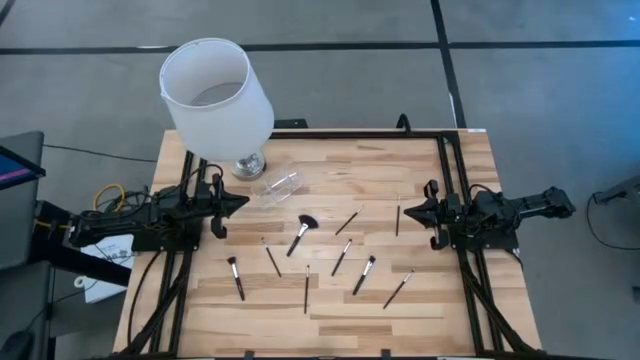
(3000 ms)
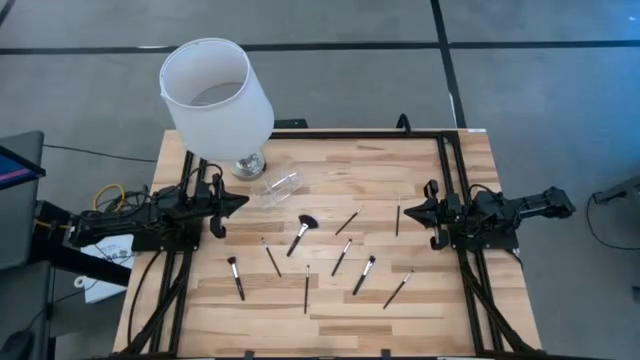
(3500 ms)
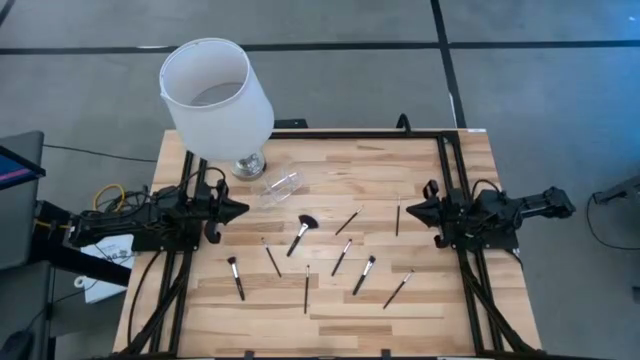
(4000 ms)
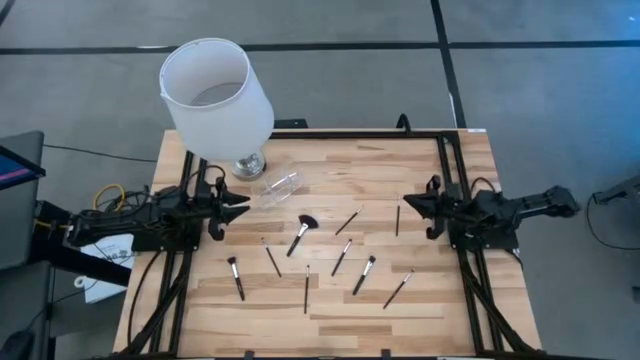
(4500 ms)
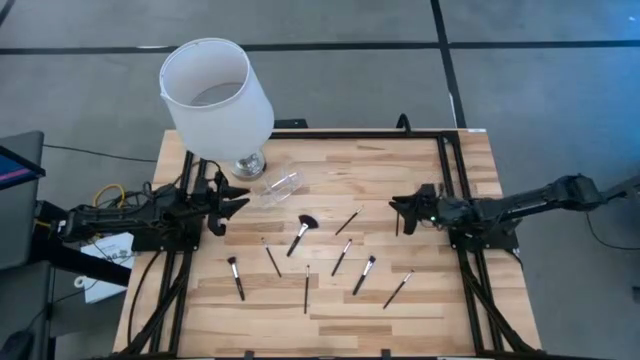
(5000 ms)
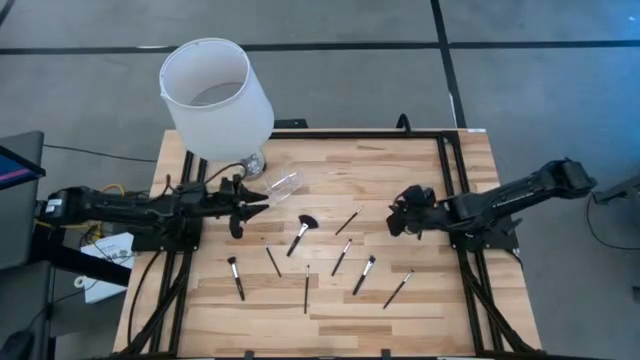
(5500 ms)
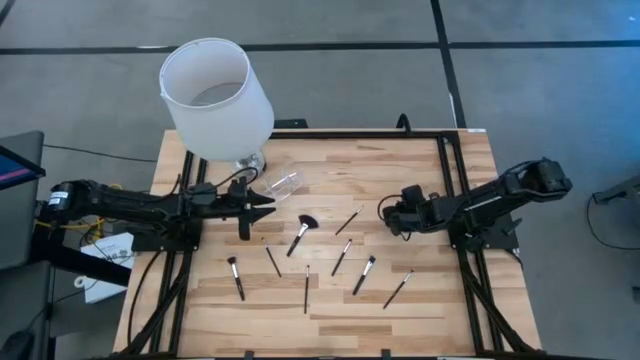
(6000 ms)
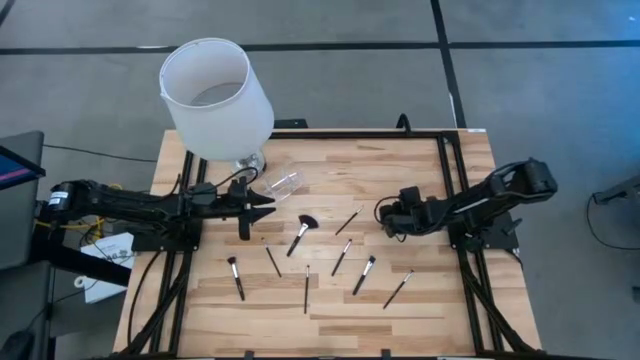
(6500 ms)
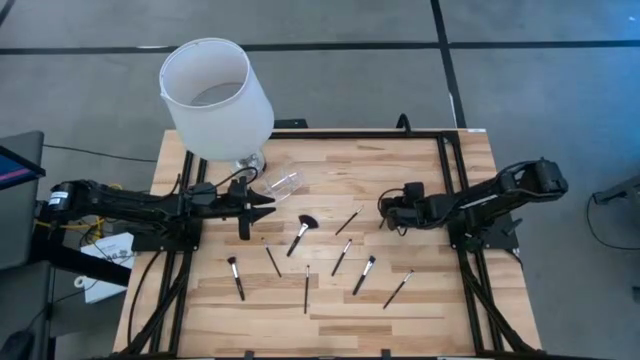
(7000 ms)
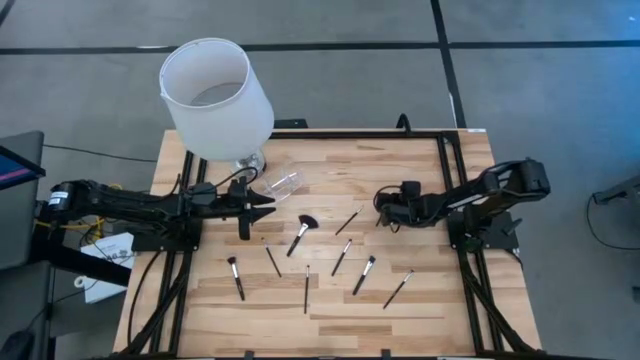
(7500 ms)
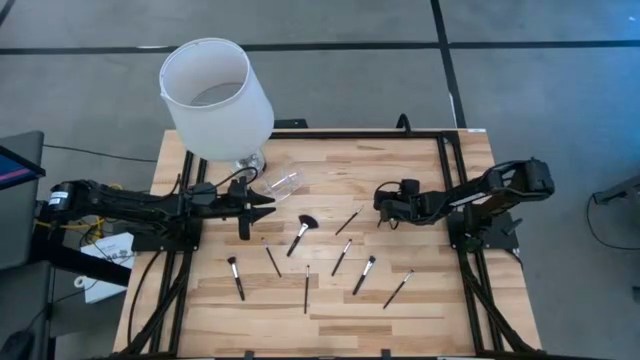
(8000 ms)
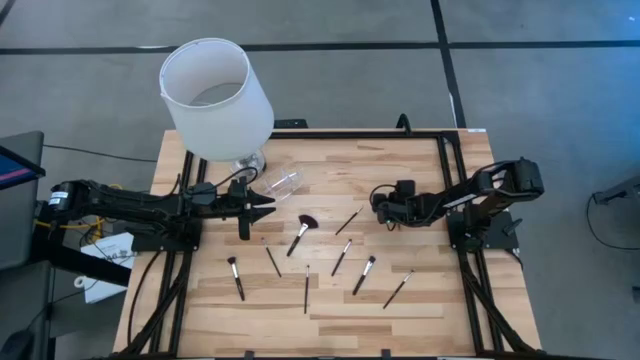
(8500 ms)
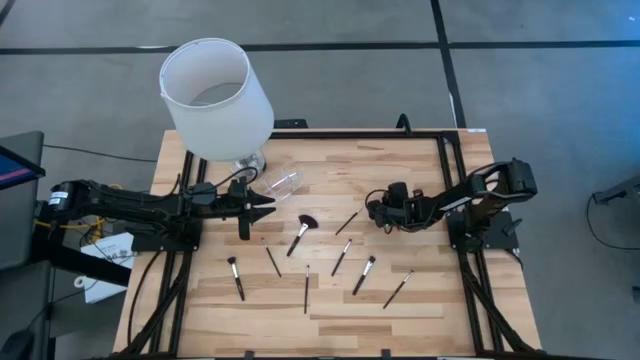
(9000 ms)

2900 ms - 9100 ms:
Task: Put items in baskets/containers
Put the black eyebrow brush in the transparent organizer

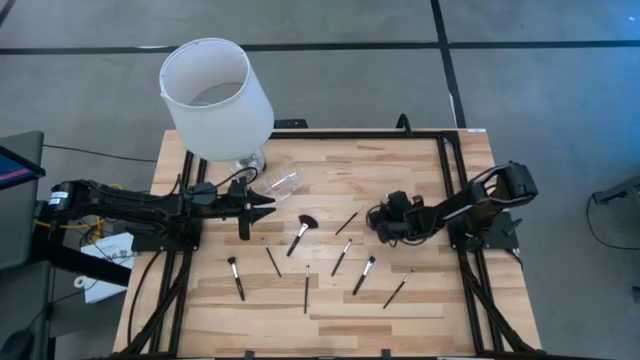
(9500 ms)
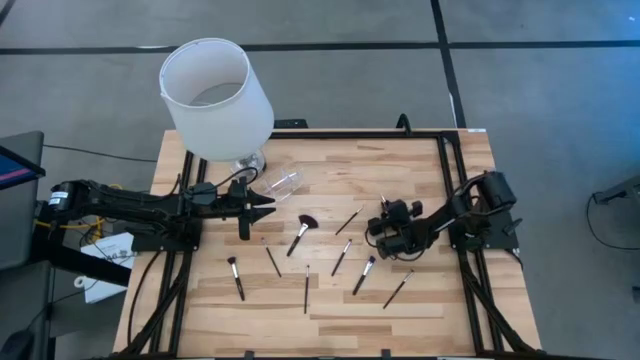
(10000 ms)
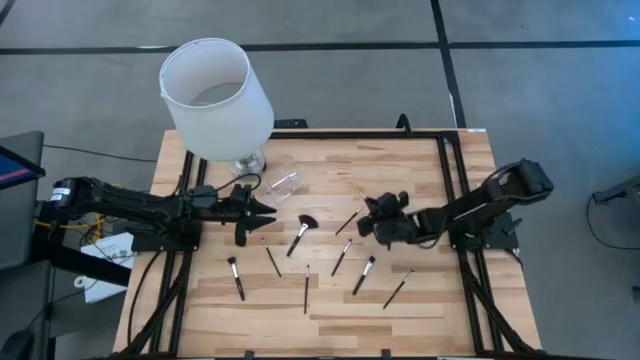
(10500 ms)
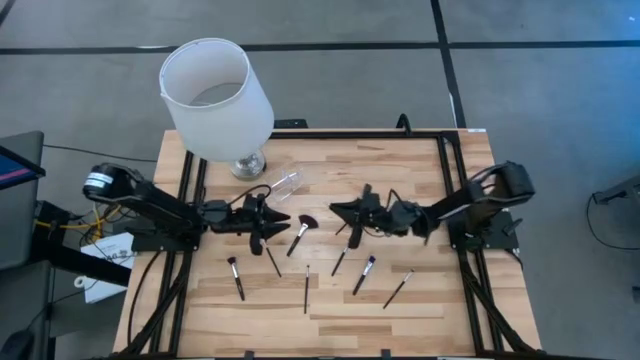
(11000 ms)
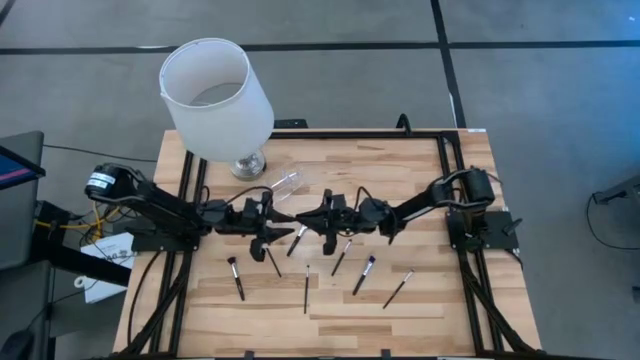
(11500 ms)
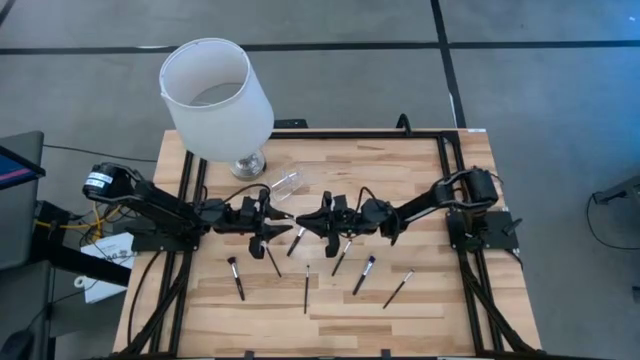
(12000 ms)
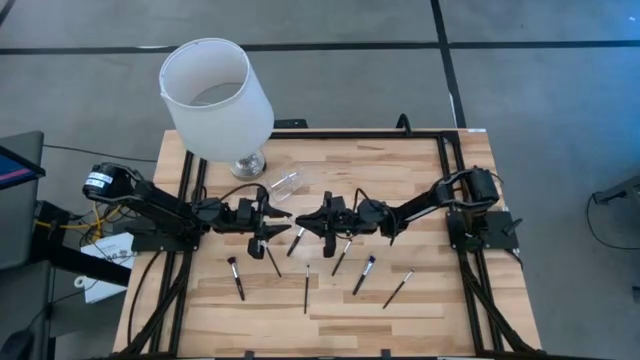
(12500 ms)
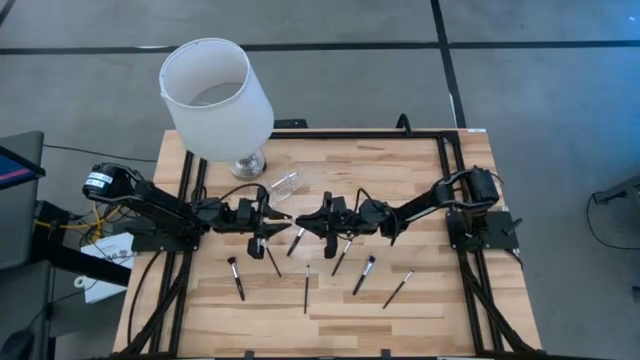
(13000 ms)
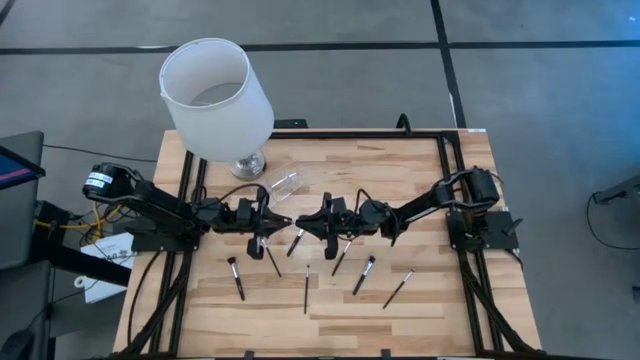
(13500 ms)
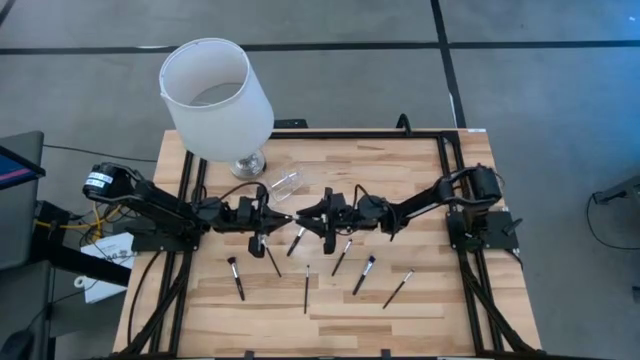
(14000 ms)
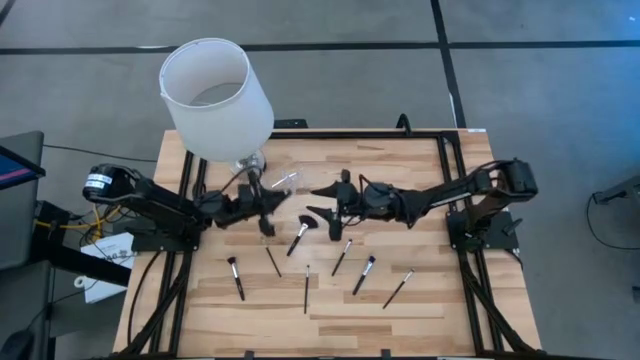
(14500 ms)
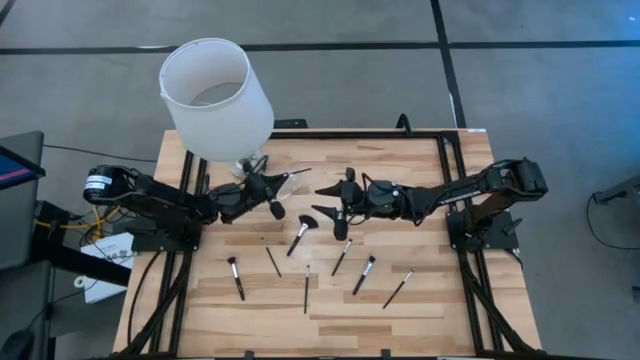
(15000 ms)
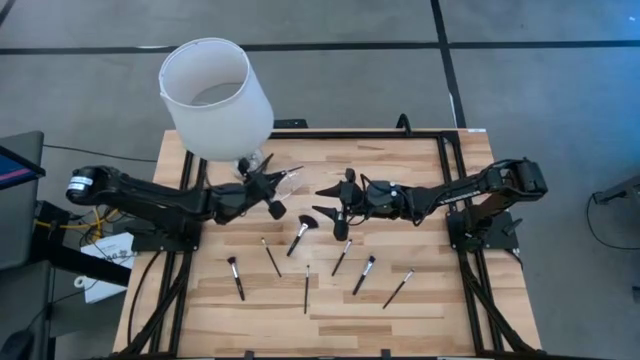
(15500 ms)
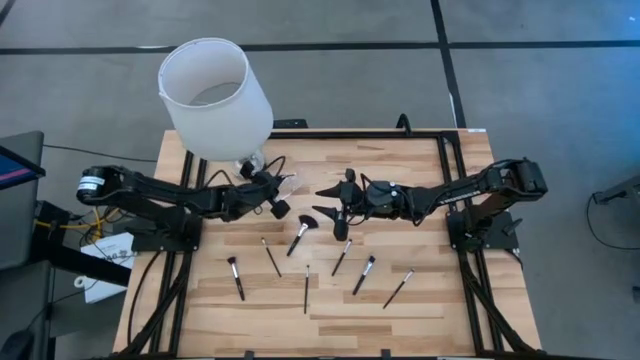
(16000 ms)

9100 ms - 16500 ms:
Put the black eyebrow brush in the transparent organizer

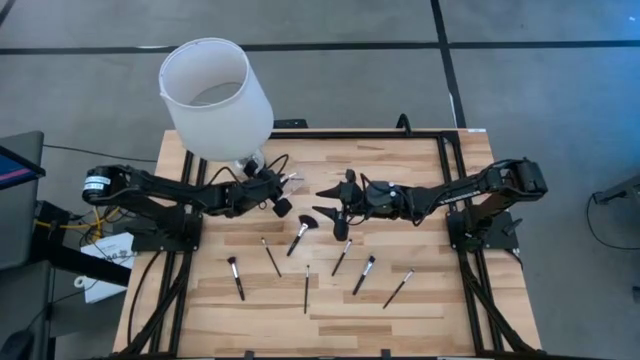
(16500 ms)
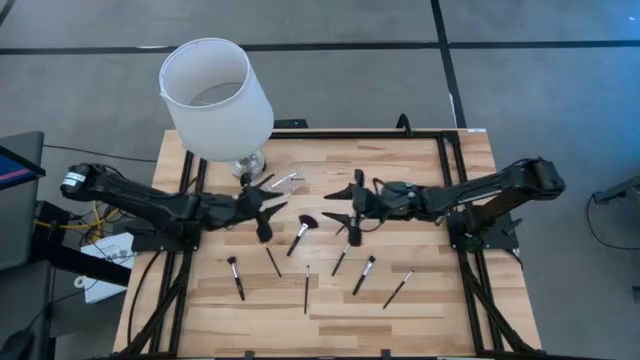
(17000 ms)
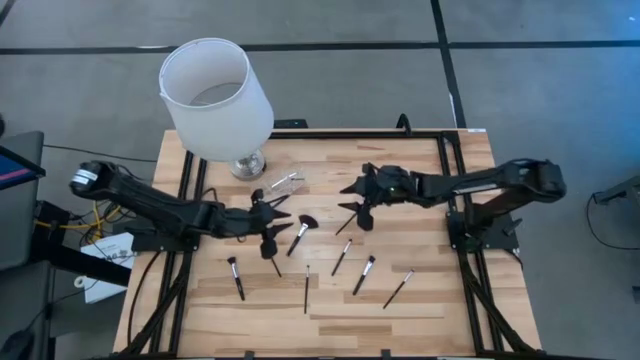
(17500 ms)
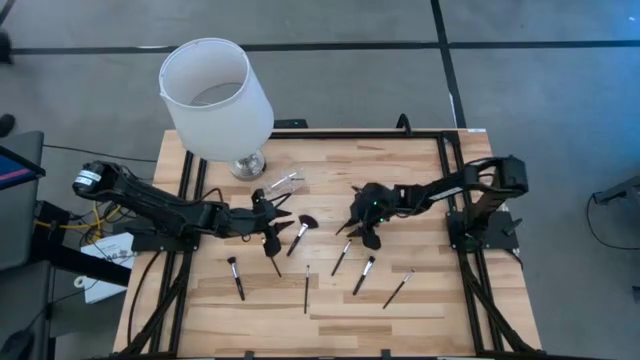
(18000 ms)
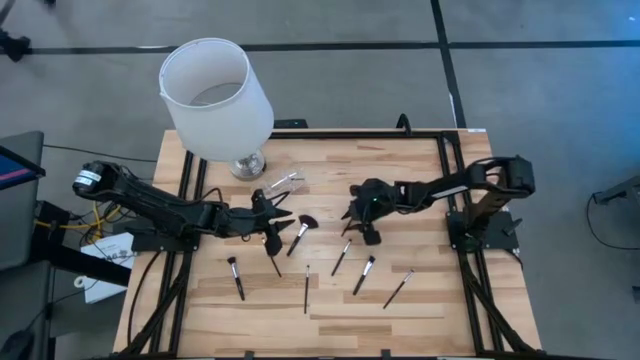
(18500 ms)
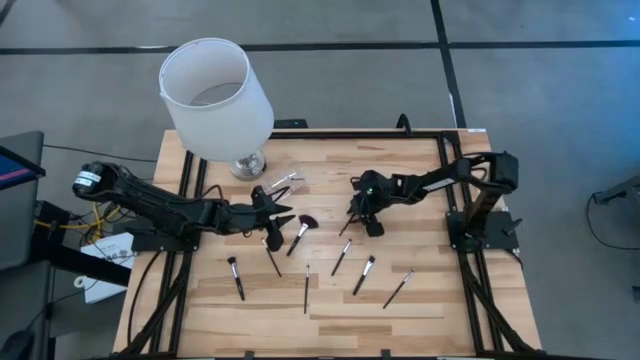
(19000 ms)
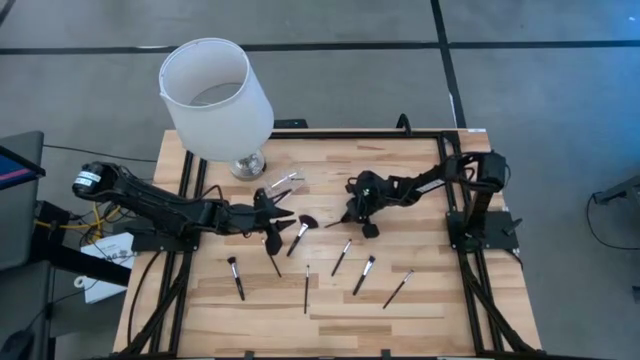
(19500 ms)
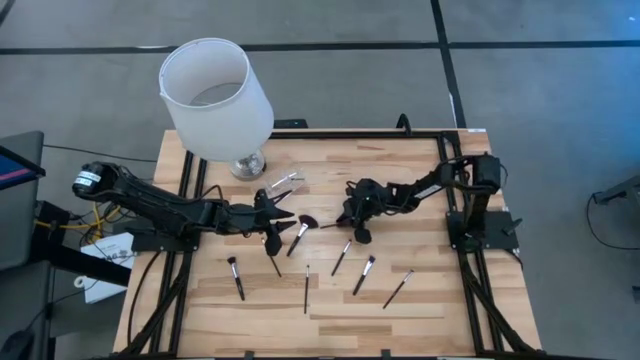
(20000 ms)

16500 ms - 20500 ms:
Put the black liner brush in the transparent organizer

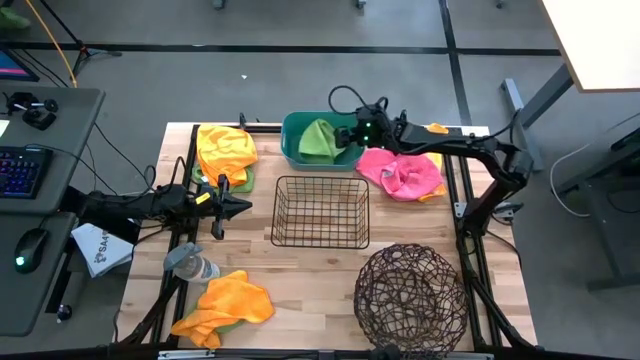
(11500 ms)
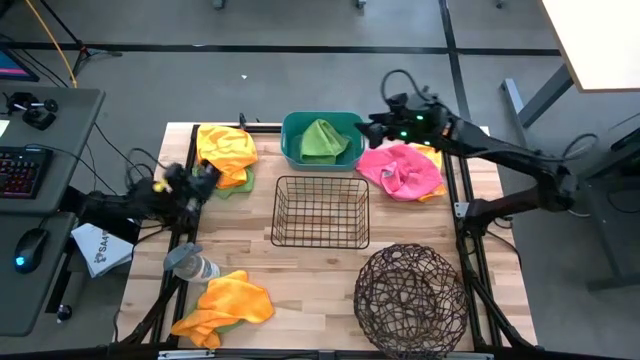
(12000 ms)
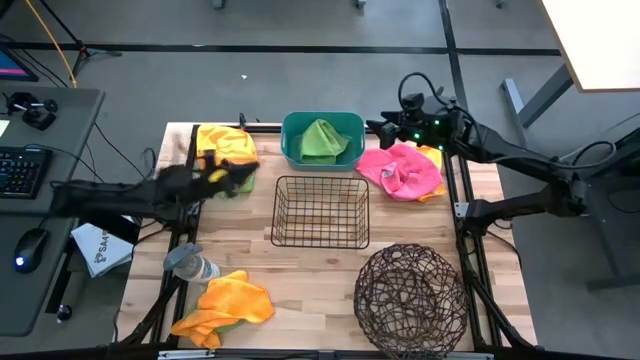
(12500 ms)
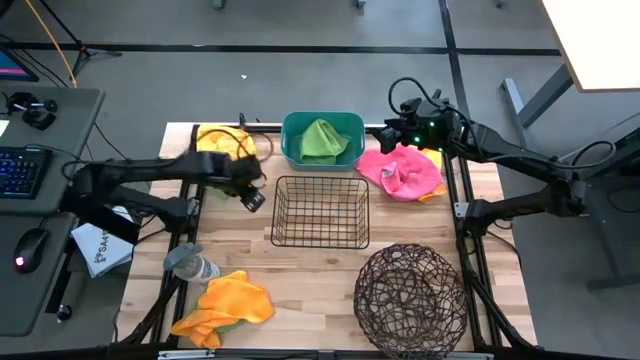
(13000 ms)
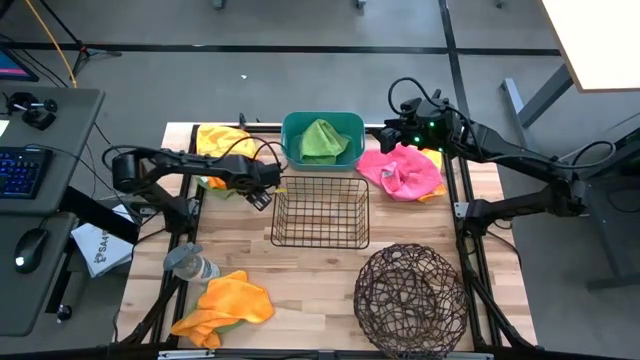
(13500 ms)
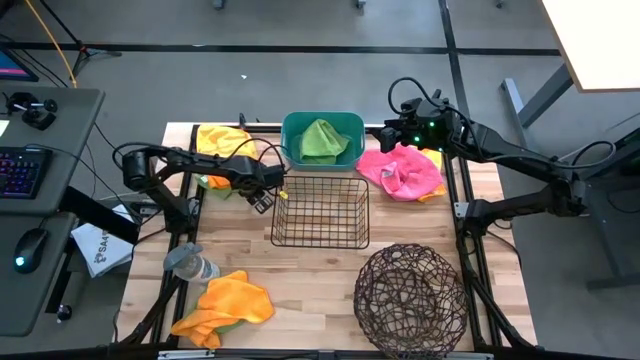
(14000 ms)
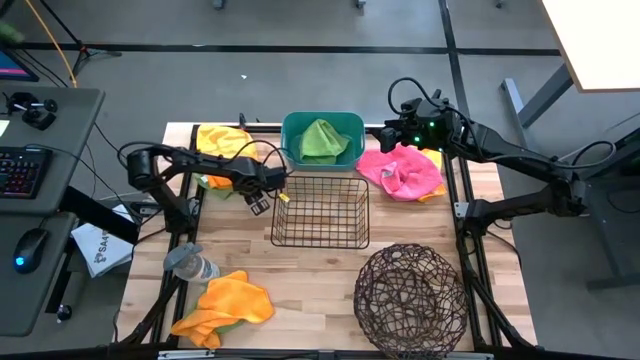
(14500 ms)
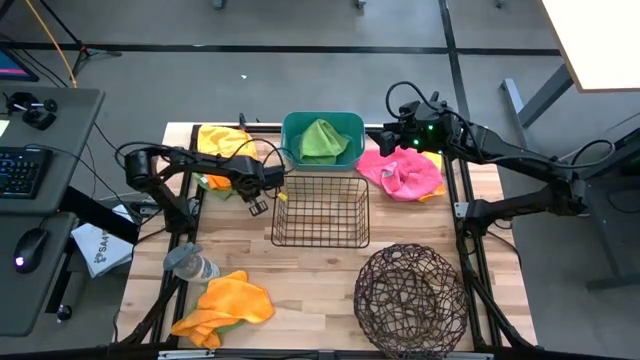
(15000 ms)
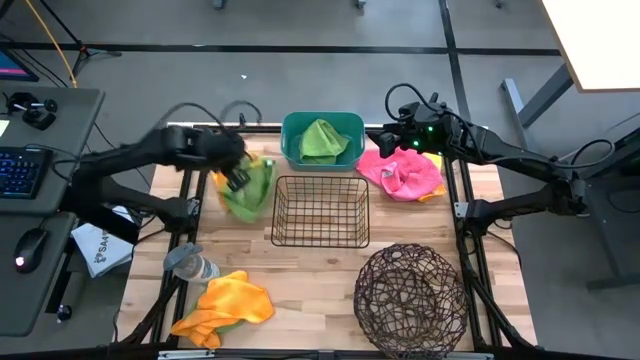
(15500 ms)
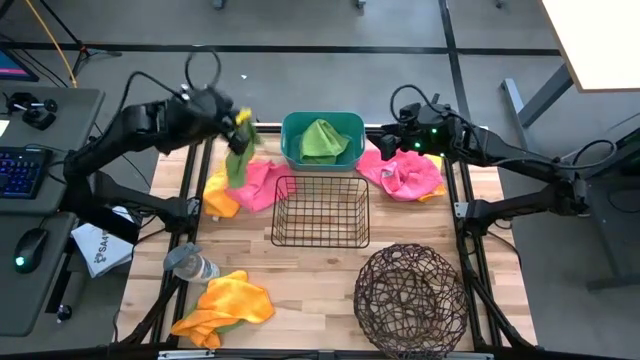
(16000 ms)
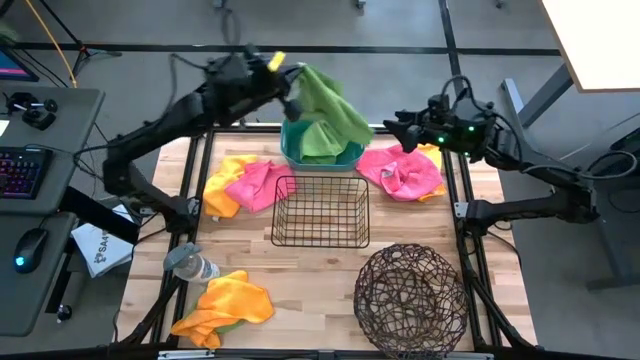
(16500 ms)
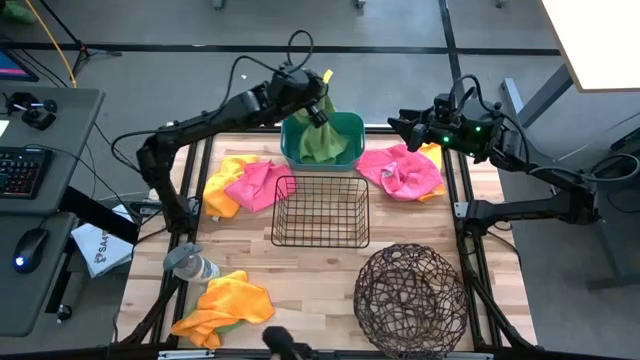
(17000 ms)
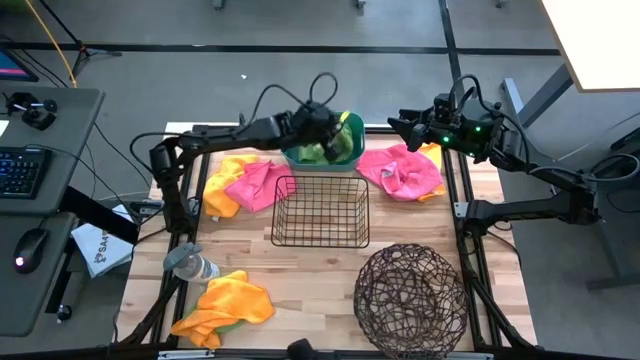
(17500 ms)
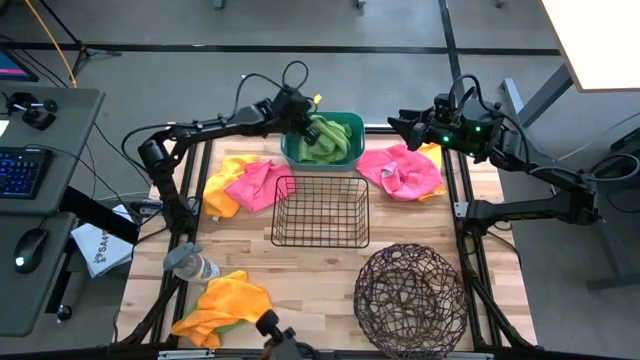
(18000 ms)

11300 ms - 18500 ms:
Task: Sort microfiber towel by color & place in baskets
Put the top green microfiber cloth into the blue bin
